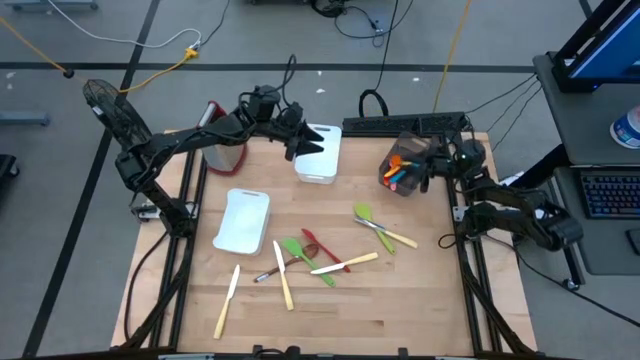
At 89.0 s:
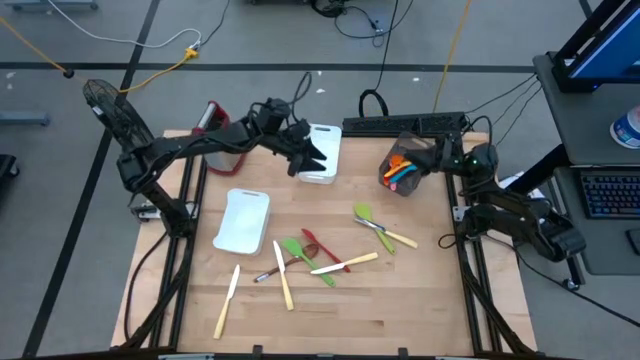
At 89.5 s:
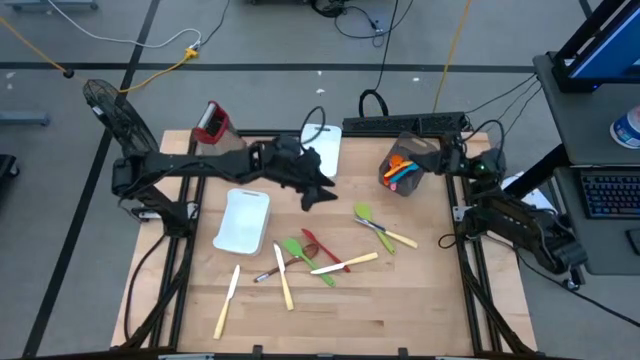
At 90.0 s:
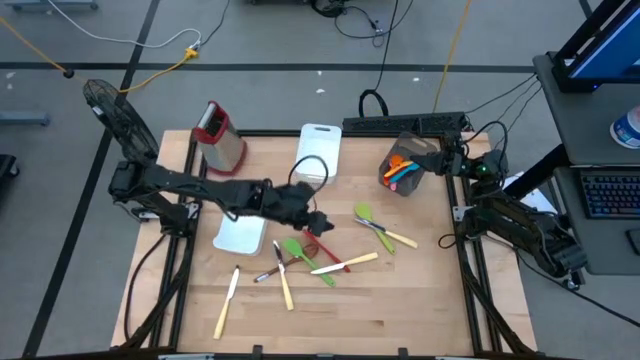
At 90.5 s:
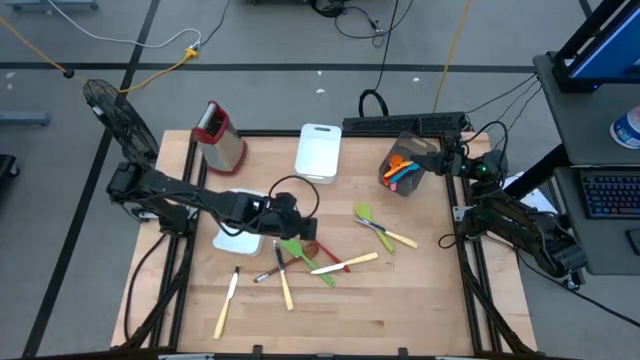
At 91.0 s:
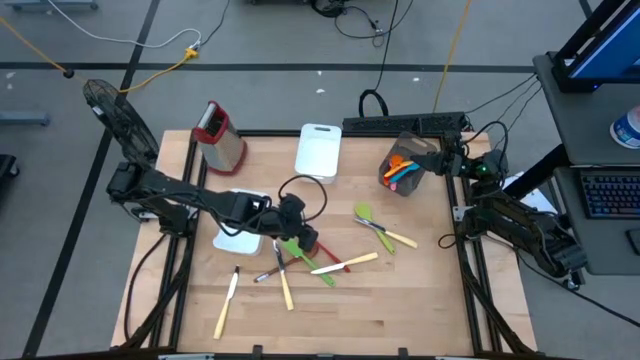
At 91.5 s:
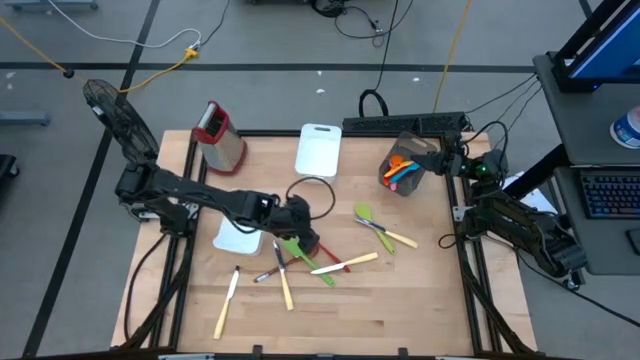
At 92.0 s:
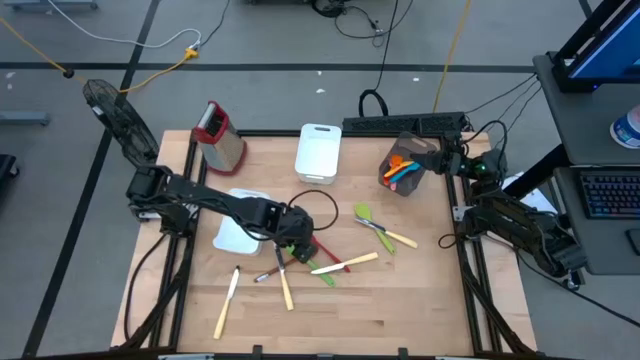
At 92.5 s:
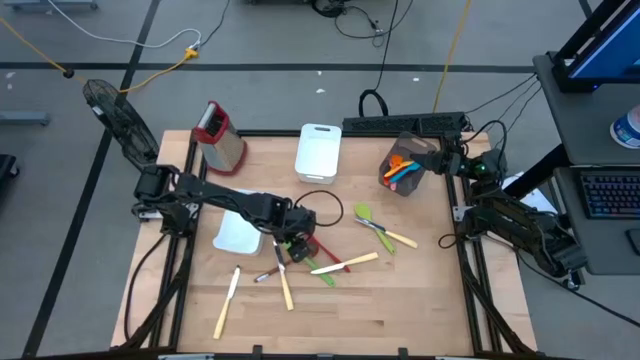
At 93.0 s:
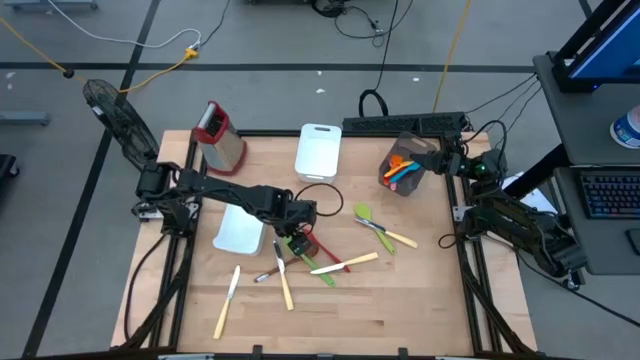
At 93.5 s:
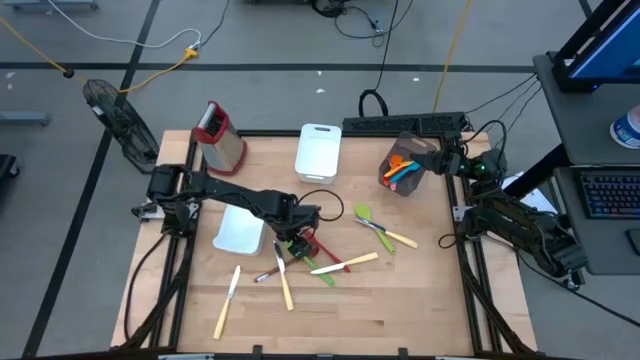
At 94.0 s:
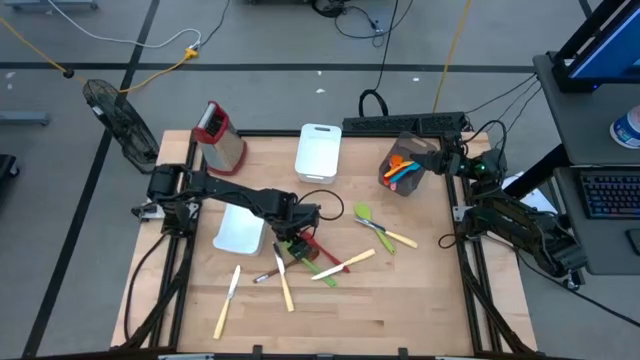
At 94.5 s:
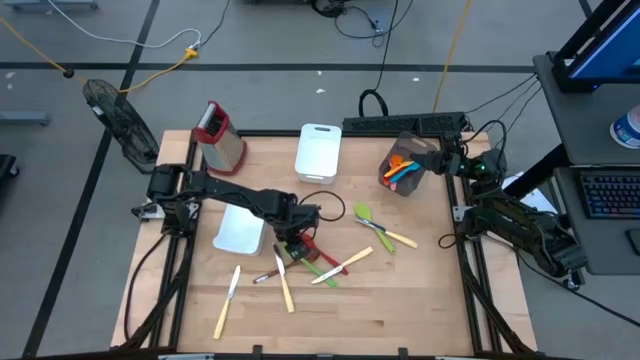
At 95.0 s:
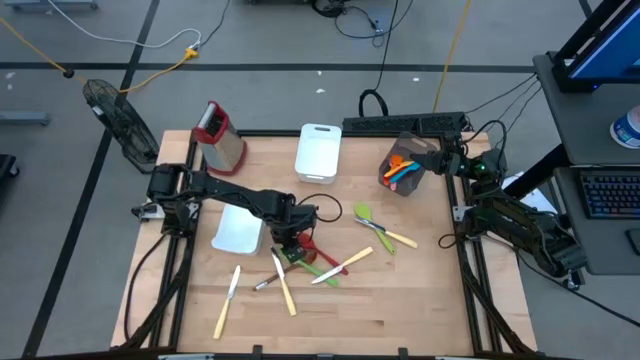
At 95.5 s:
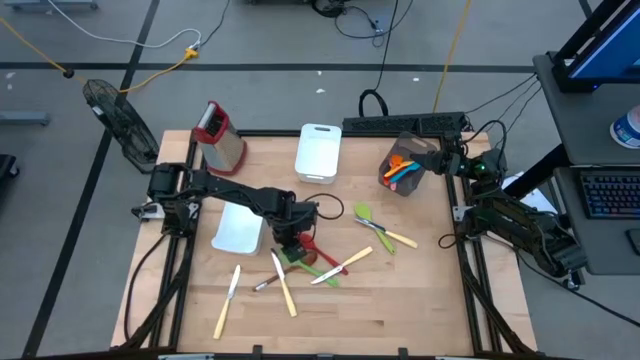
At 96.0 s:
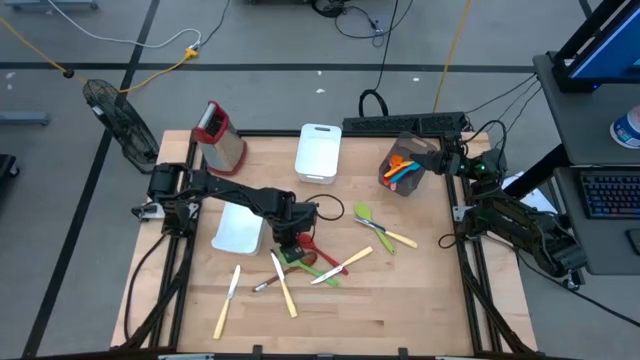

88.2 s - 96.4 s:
Task: Pick & Place Kitchen Items
Put the green spatula into the black bin

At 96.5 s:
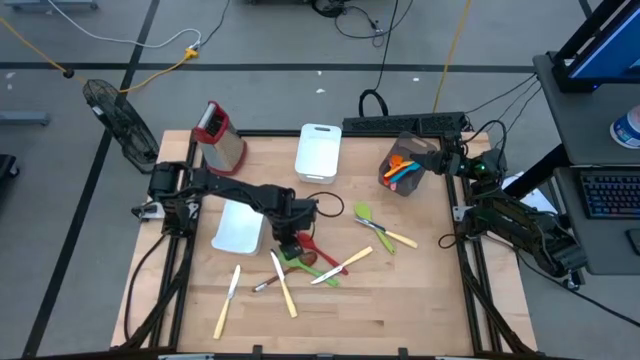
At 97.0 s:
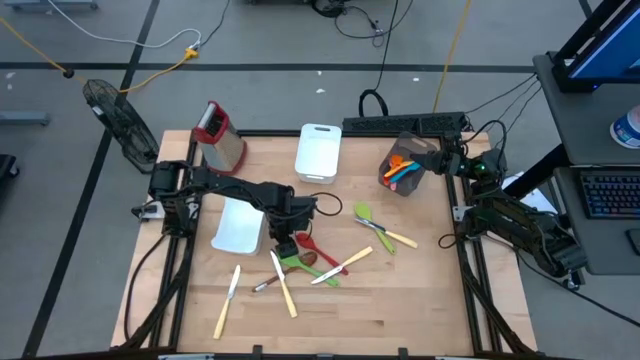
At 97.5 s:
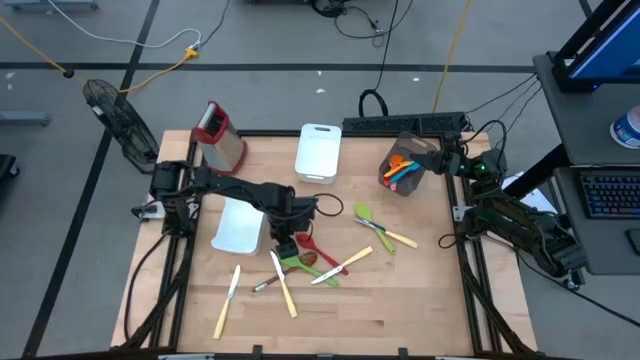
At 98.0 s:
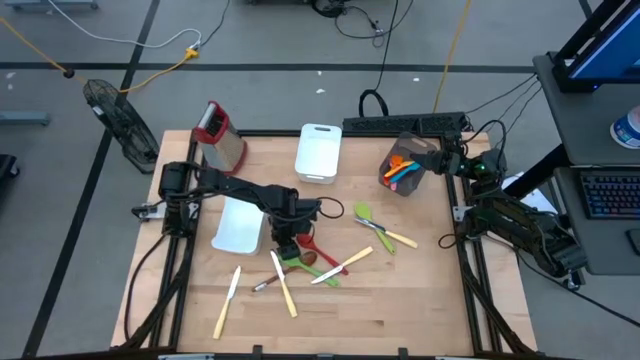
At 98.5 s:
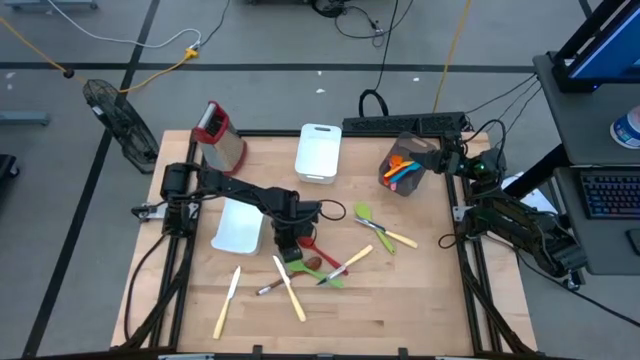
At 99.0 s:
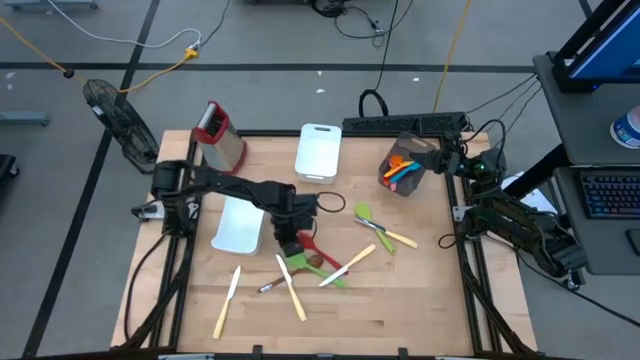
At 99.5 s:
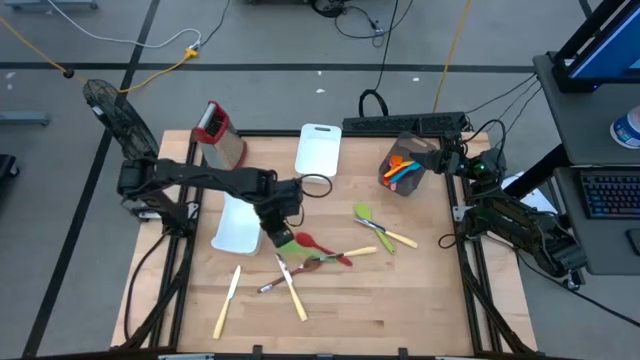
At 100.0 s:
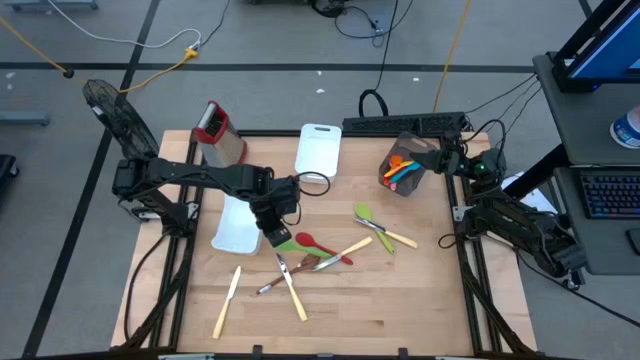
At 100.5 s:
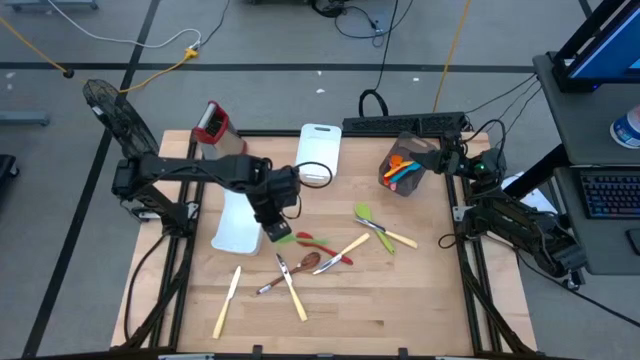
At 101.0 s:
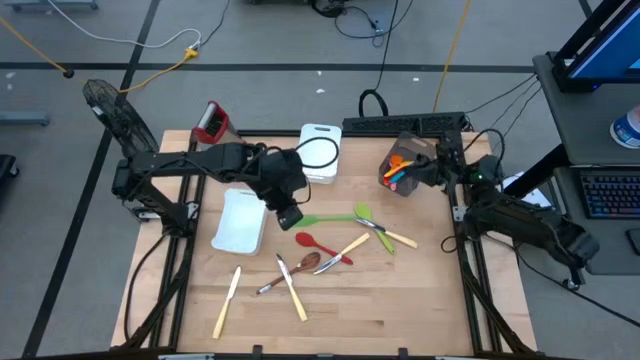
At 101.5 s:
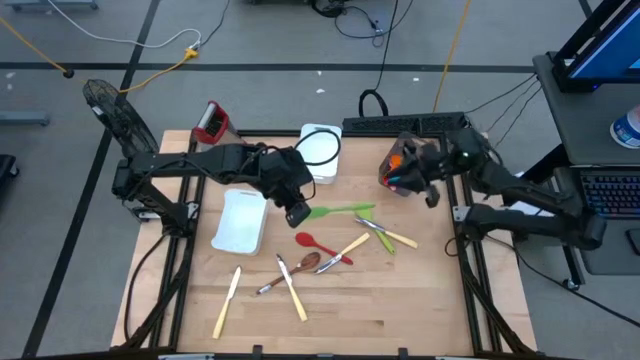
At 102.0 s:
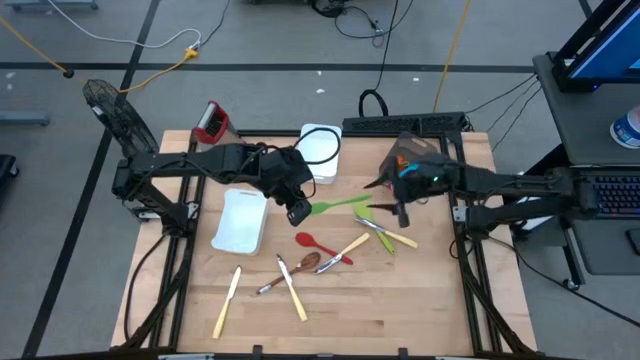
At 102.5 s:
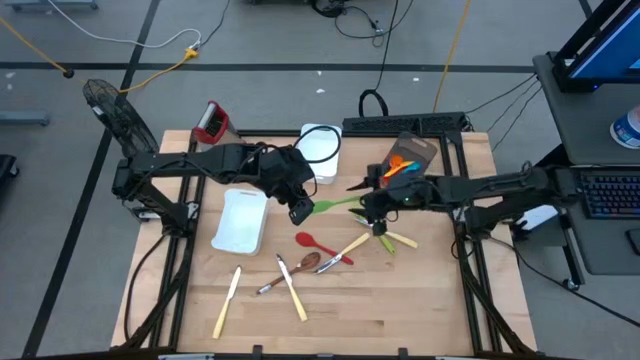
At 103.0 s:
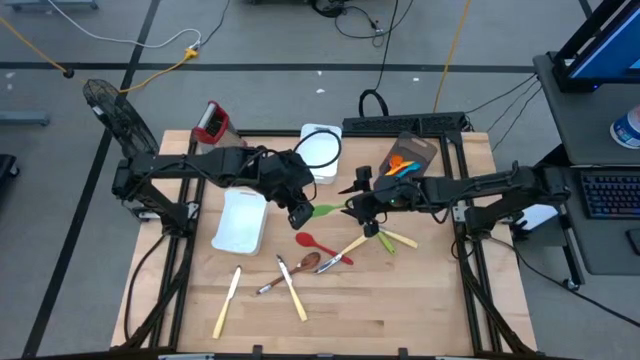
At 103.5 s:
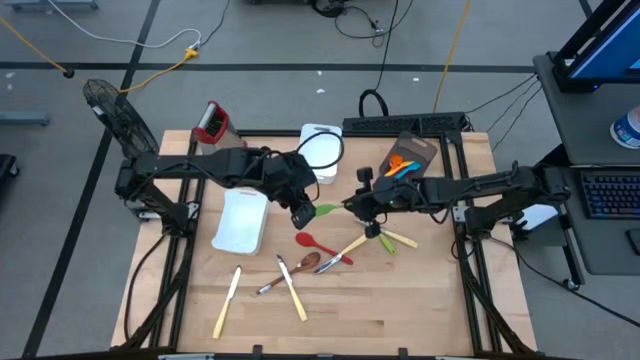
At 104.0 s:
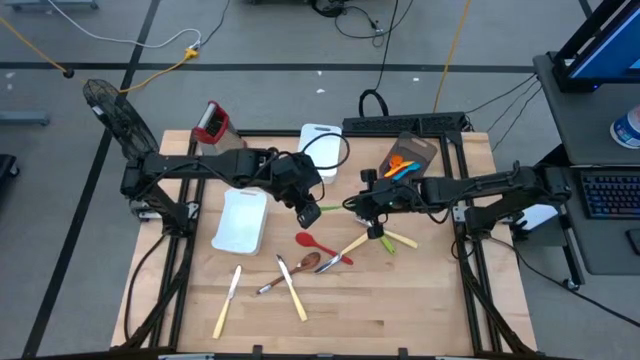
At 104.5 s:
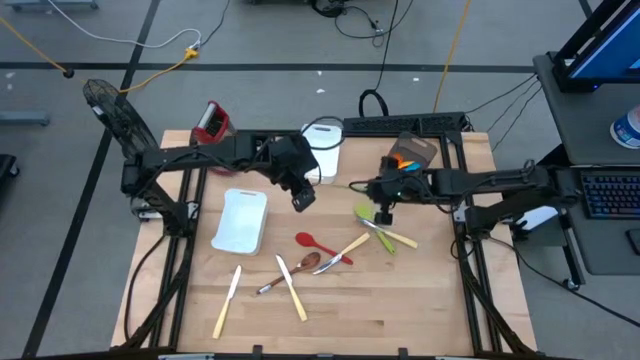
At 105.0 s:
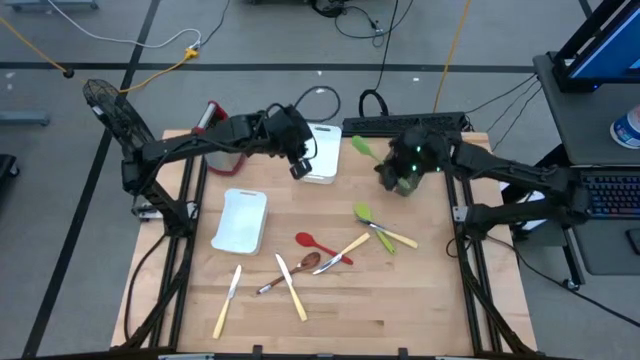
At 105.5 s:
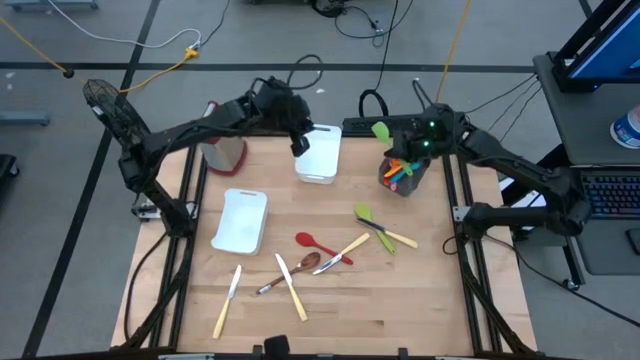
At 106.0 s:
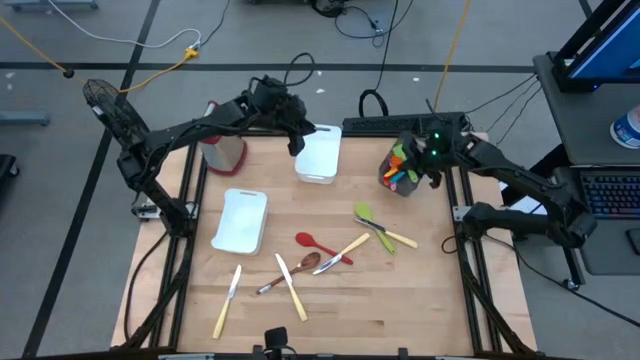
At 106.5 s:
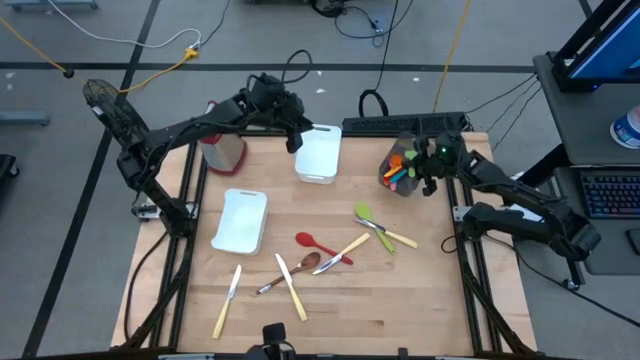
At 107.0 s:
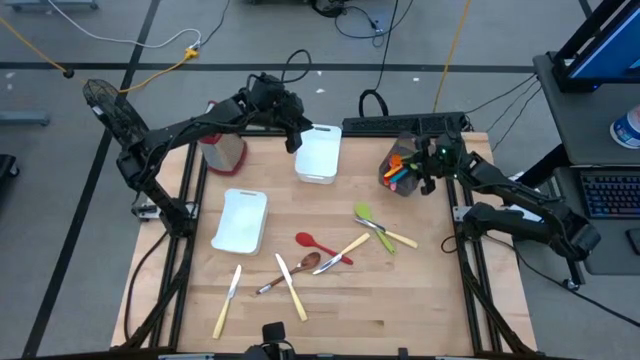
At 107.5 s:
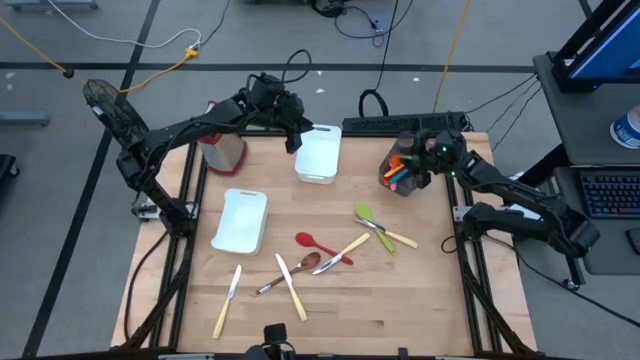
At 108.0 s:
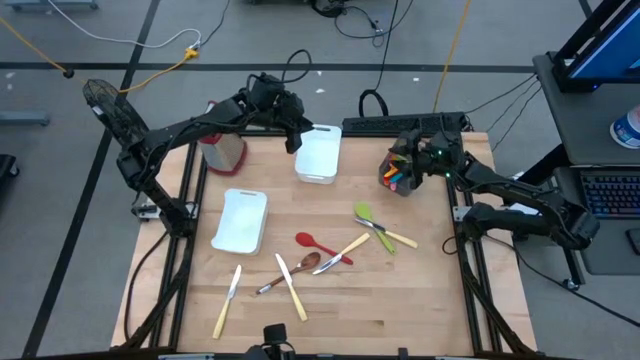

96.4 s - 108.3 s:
Put the green spatula into the black bin
